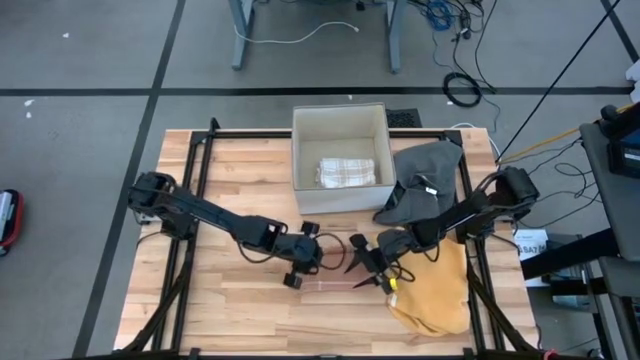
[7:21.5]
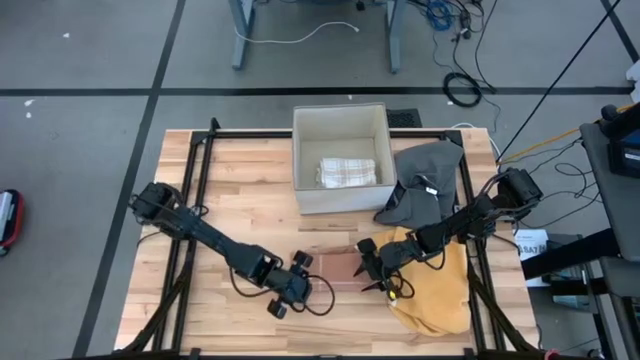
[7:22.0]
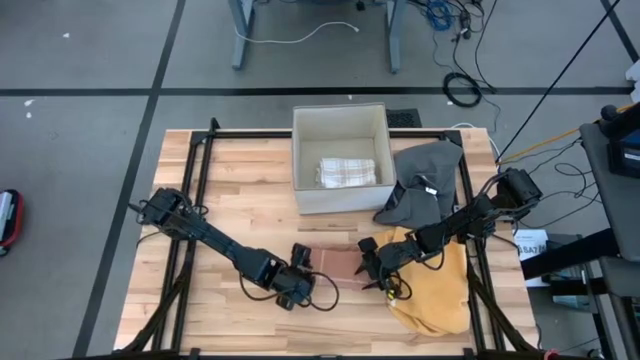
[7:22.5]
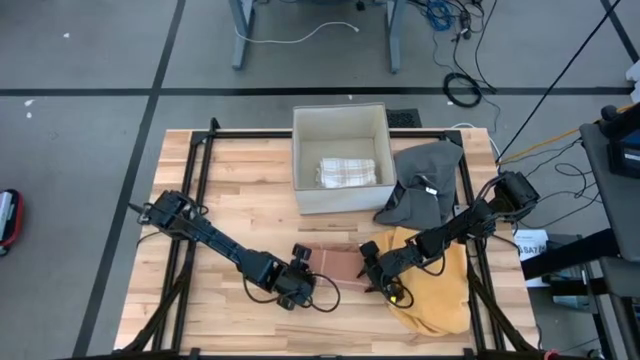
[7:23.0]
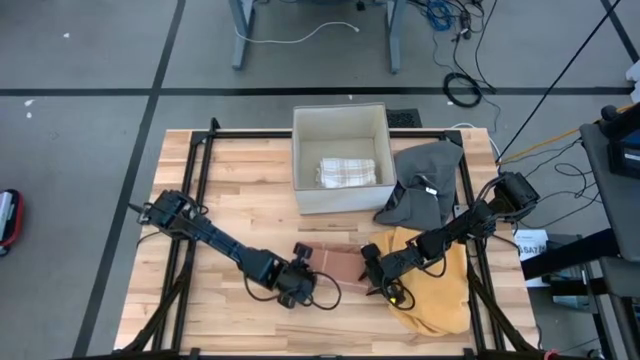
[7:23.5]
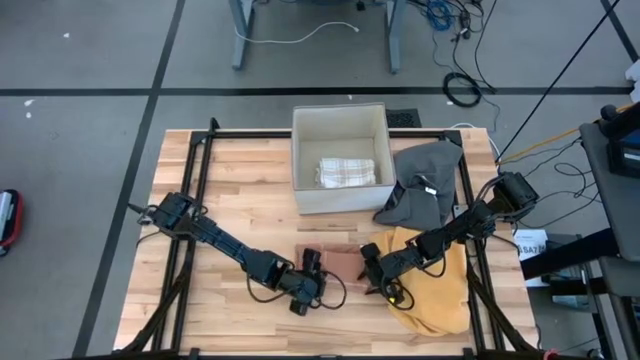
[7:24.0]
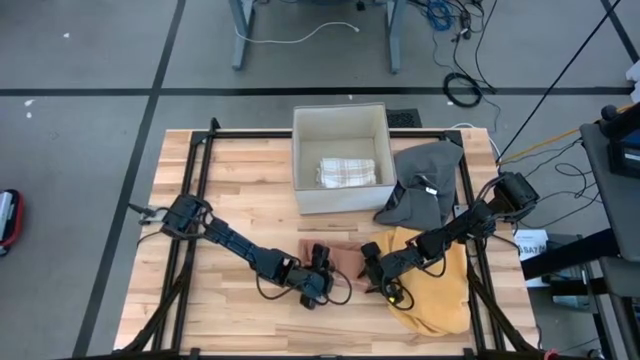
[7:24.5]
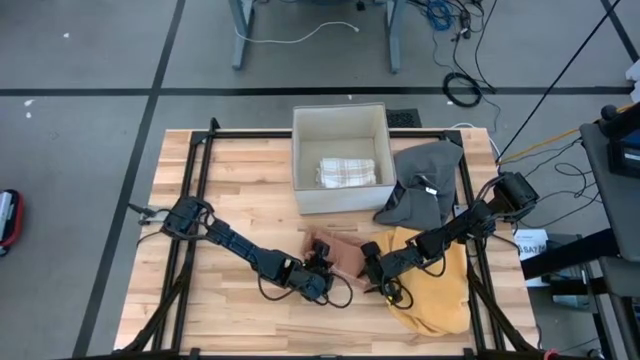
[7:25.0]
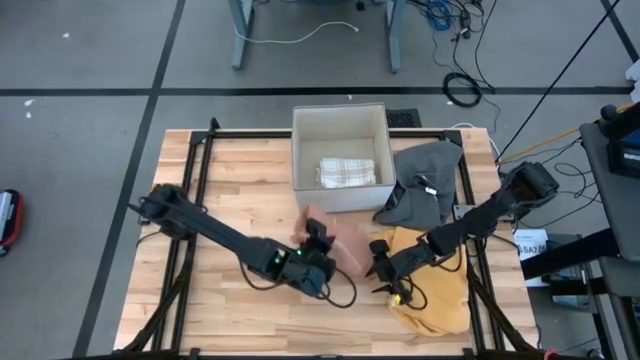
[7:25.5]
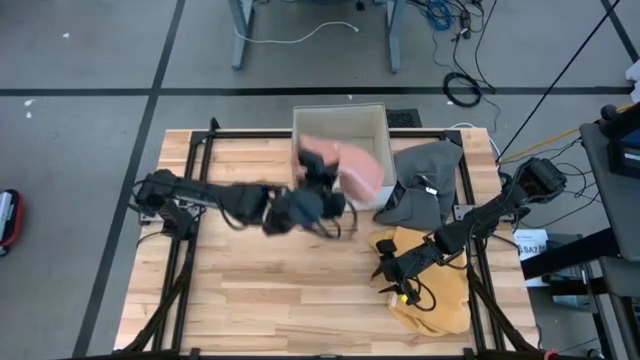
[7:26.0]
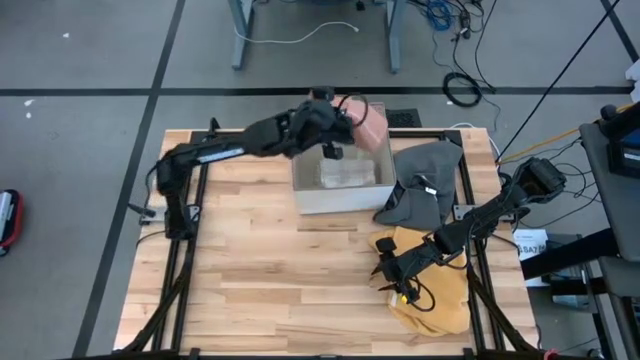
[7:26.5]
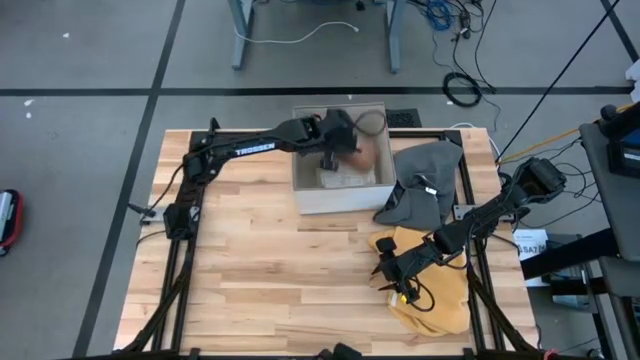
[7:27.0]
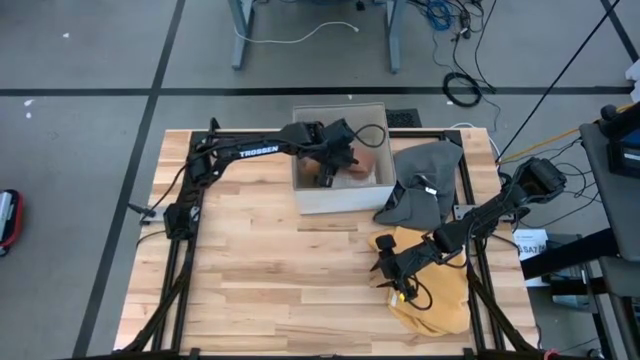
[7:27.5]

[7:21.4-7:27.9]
Task: Fold towel
Put the orange towel into the laundry bin

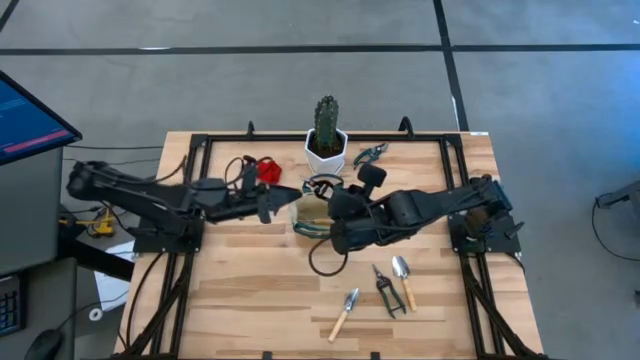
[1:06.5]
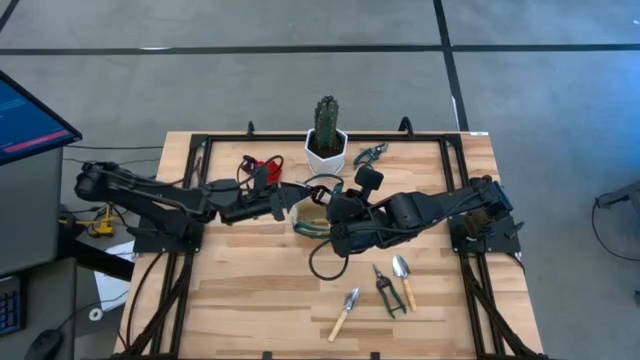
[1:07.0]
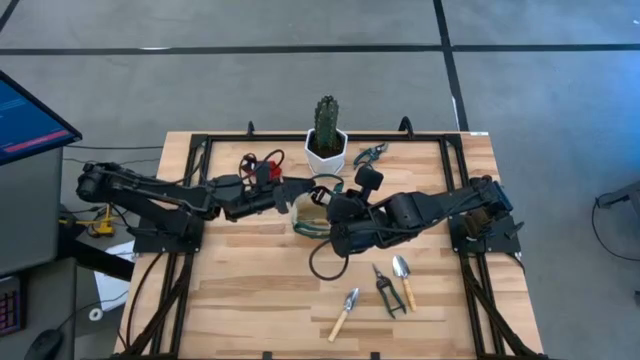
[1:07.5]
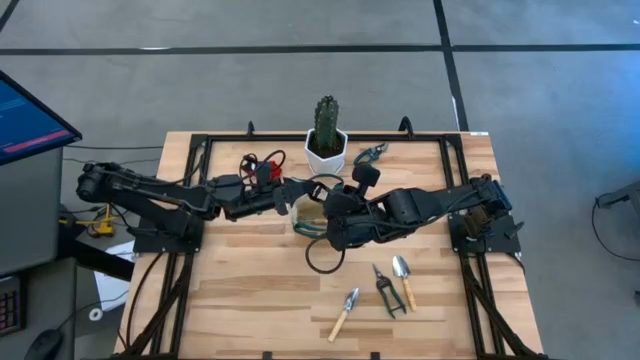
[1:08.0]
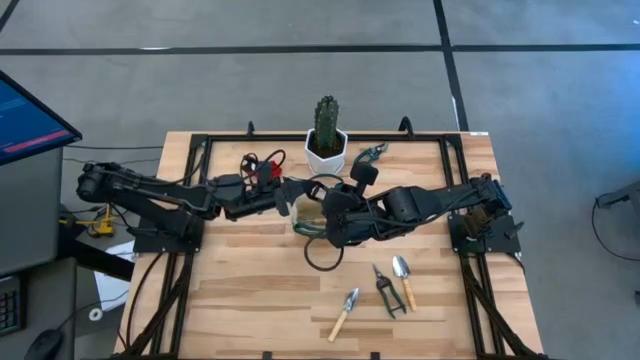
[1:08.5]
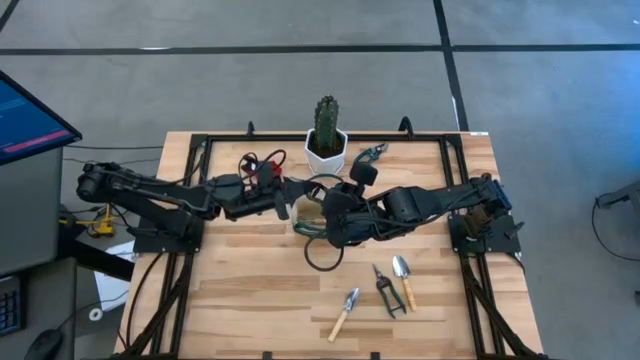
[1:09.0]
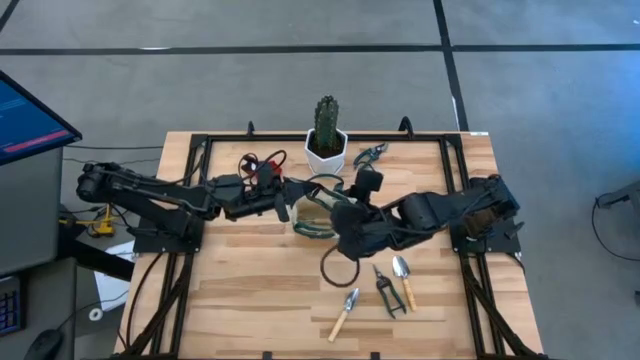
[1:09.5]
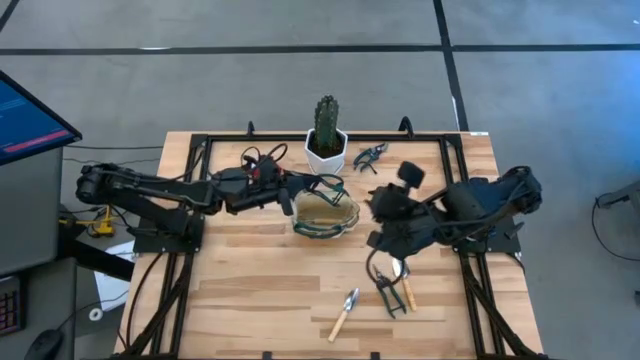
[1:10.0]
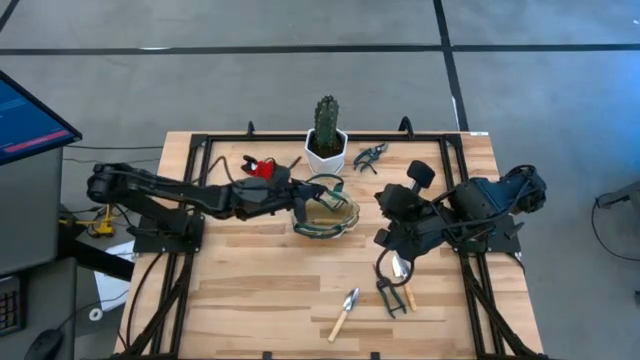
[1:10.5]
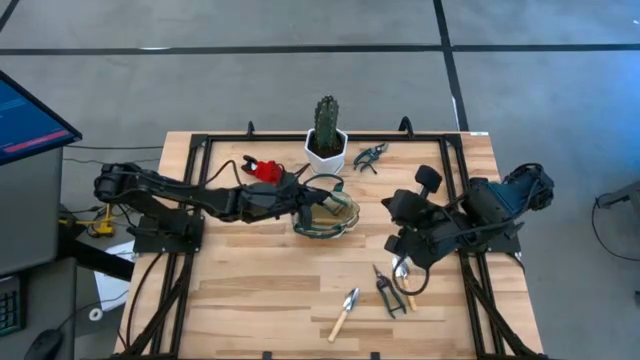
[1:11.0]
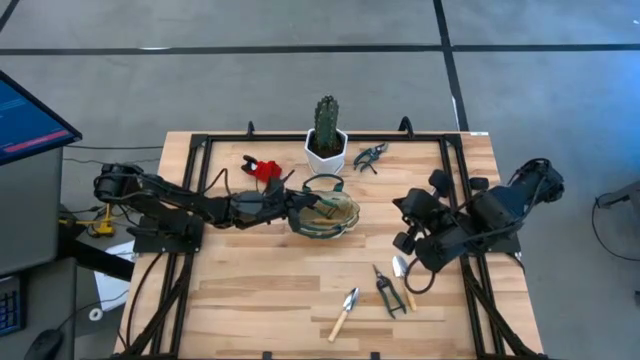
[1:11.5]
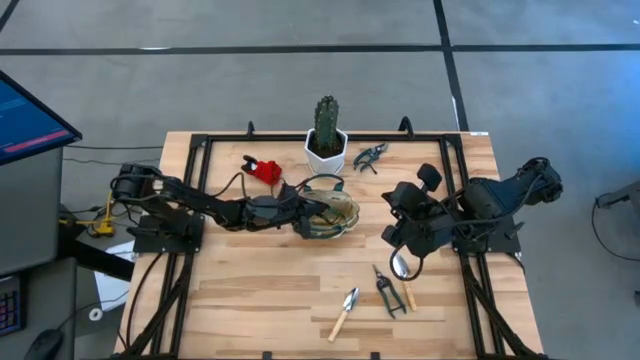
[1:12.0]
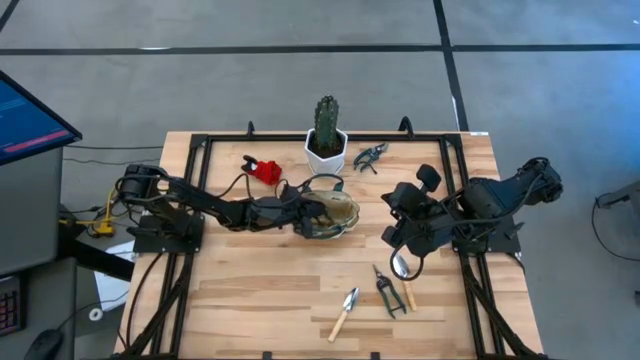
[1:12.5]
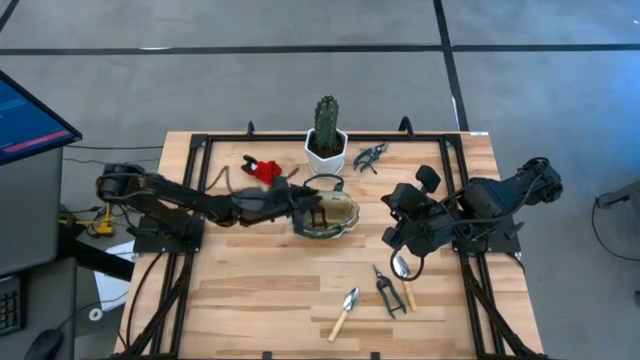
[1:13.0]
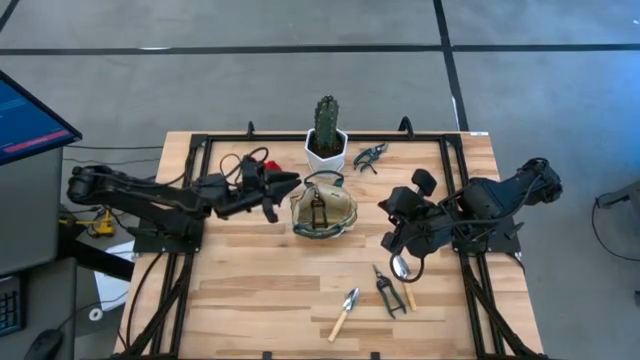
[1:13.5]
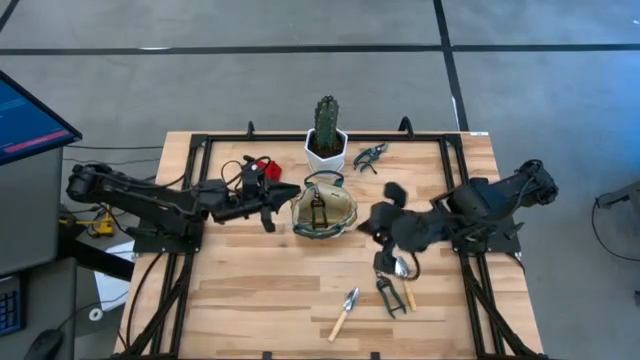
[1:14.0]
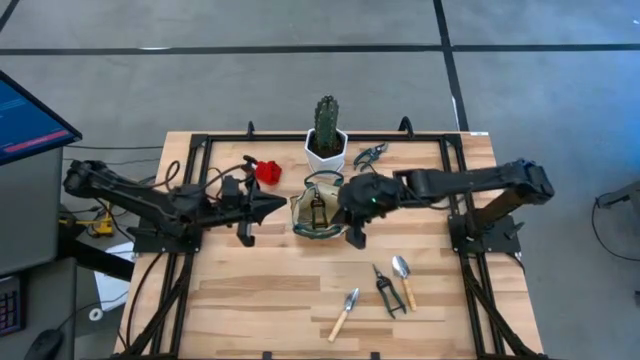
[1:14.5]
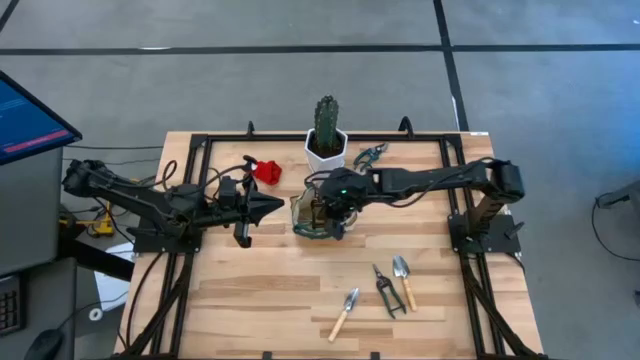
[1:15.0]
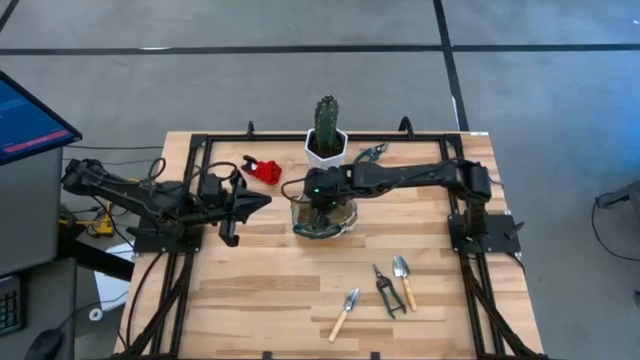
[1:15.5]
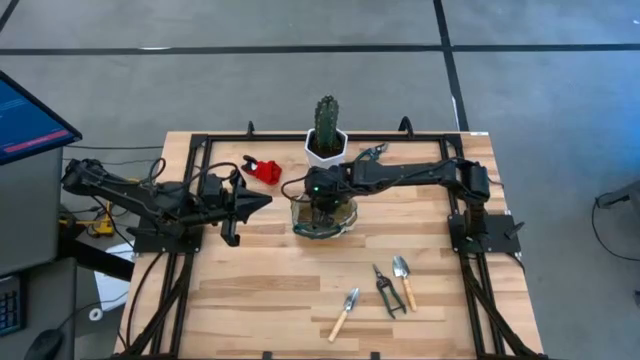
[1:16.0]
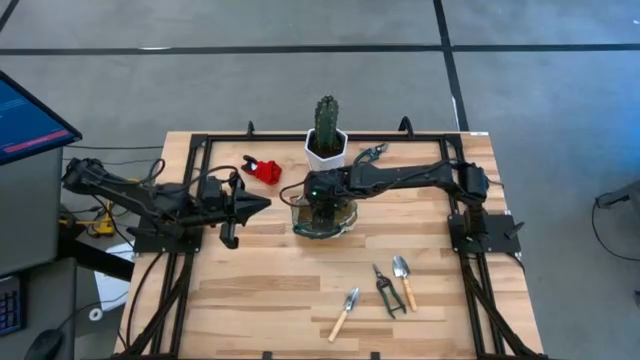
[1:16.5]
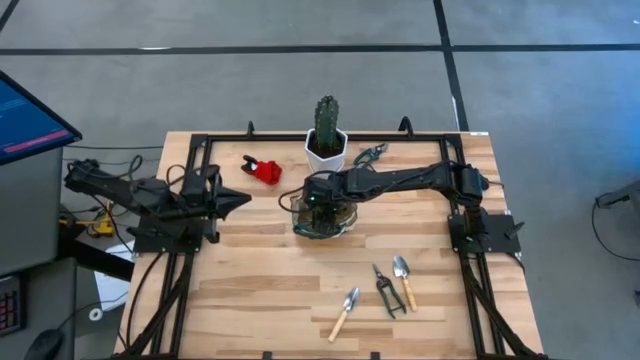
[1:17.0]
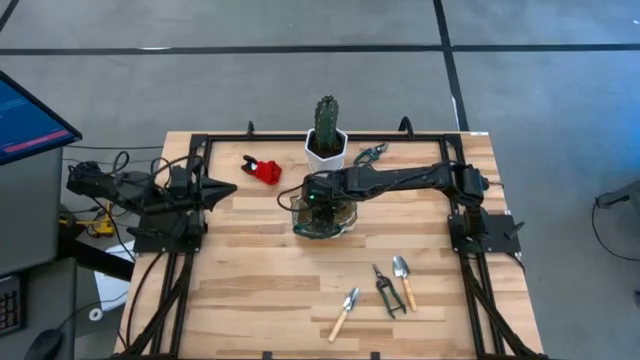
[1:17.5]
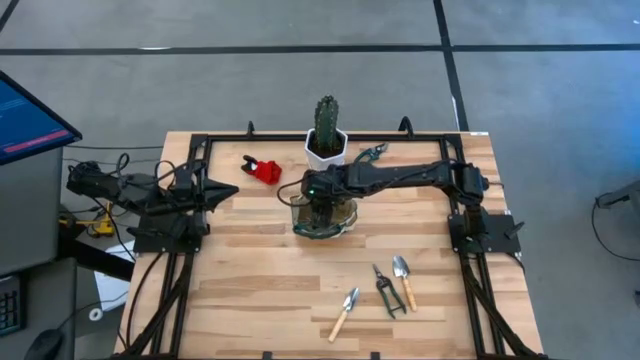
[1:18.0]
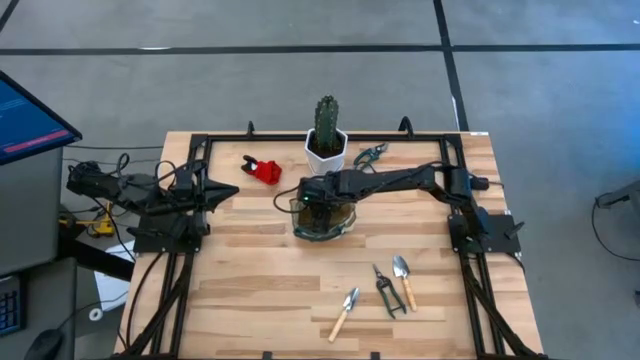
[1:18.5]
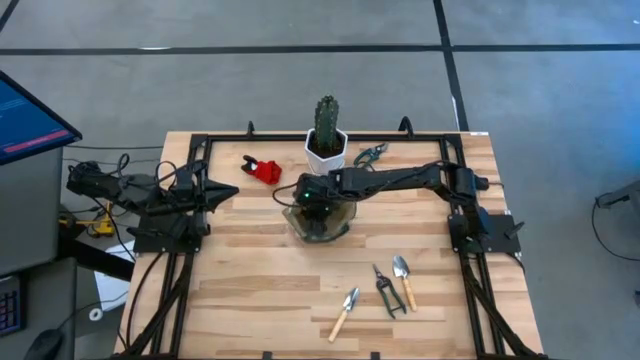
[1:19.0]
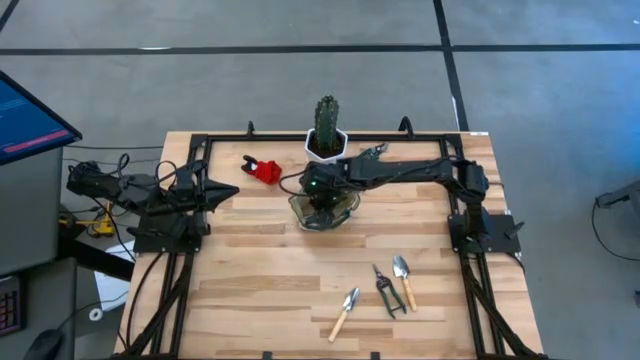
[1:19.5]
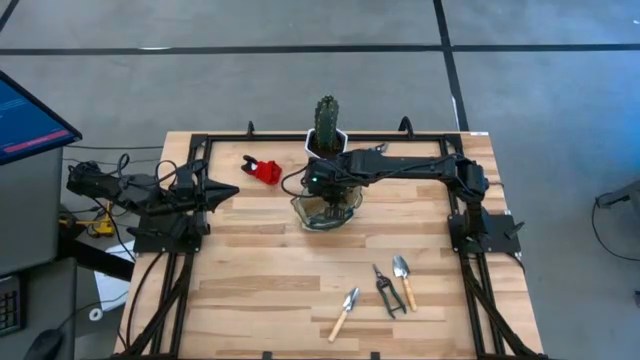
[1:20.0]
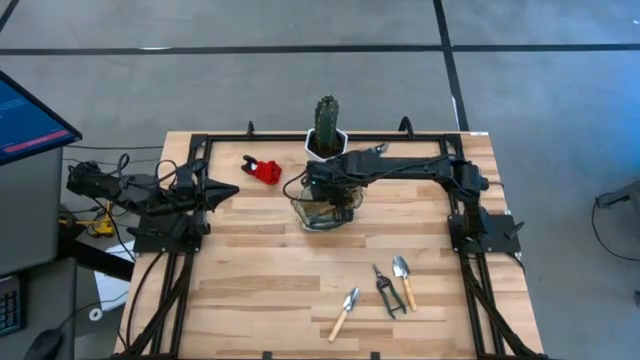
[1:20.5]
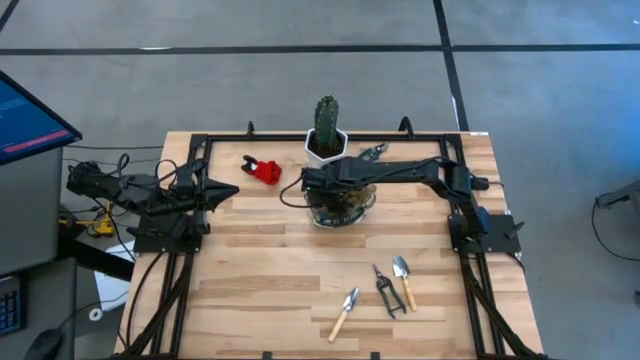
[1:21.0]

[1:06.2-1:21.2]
Task: Pick & Place Garden tools in Gardening bag
Put the middle green shear scissors into the gardening bag

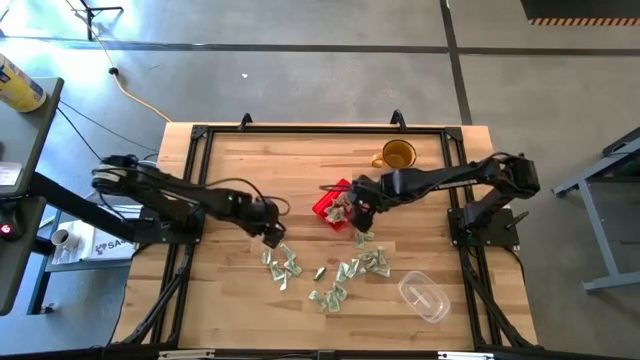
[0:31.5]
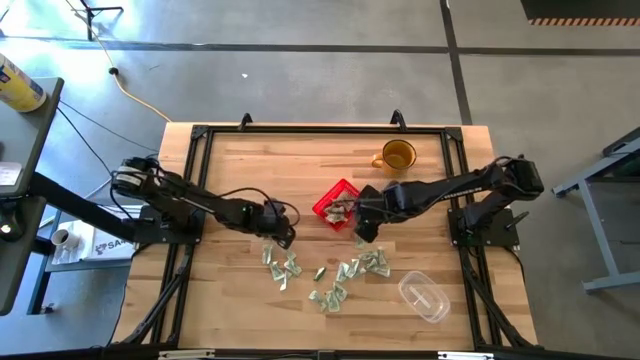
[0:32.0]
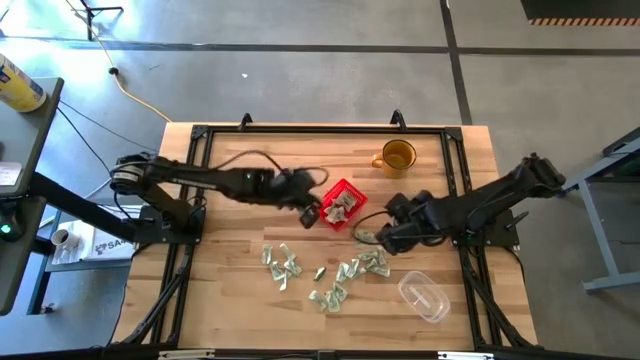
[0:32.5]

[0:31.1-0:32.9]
Task: Pick and place items into bin
Put the white stevia packet into the red bin
